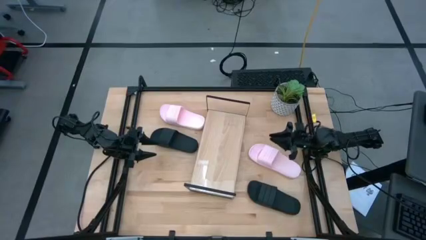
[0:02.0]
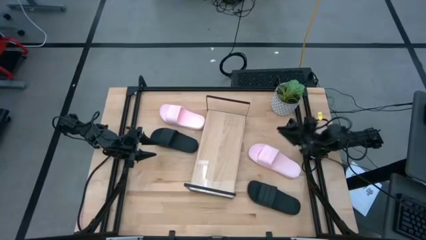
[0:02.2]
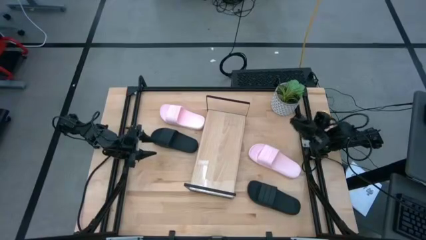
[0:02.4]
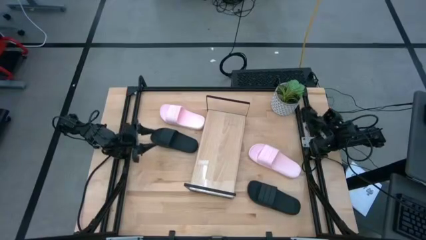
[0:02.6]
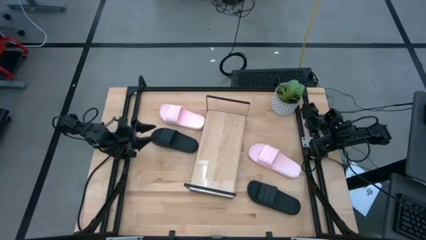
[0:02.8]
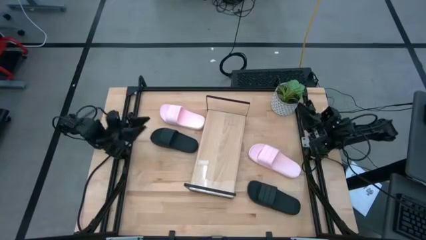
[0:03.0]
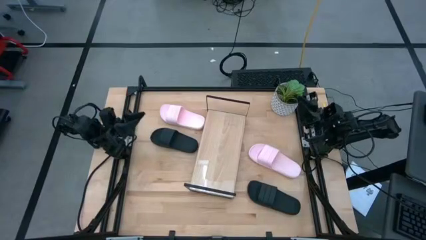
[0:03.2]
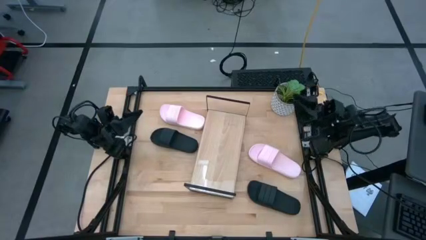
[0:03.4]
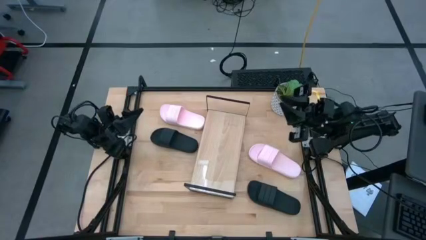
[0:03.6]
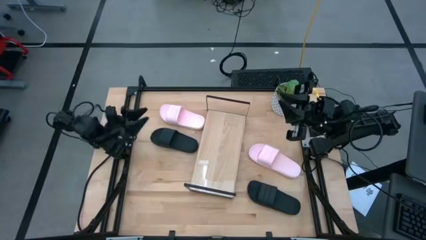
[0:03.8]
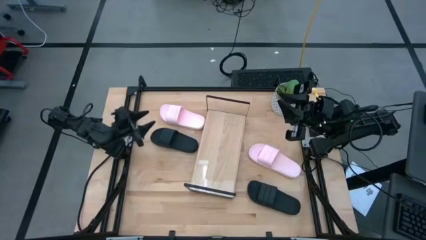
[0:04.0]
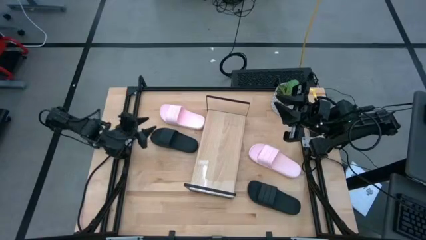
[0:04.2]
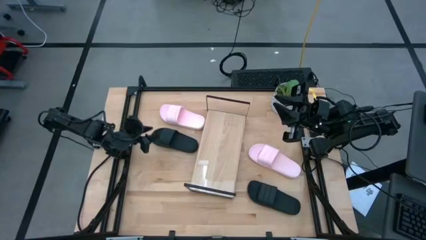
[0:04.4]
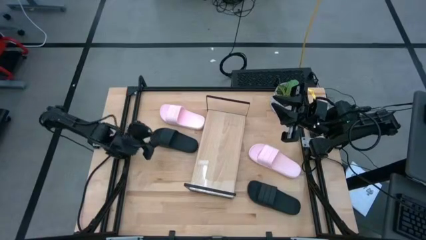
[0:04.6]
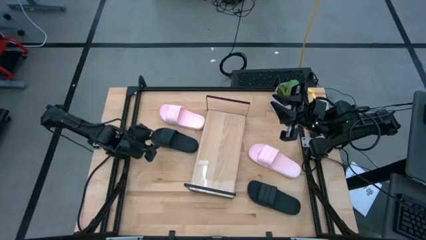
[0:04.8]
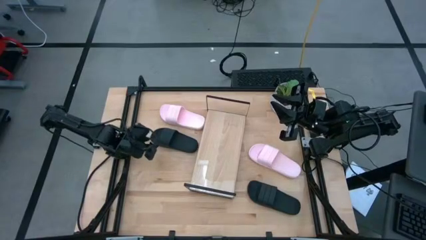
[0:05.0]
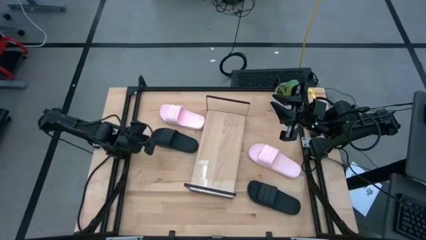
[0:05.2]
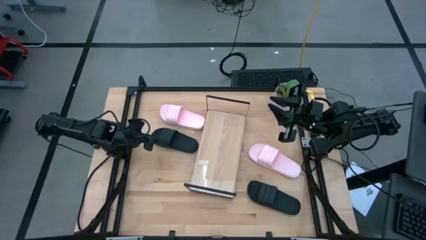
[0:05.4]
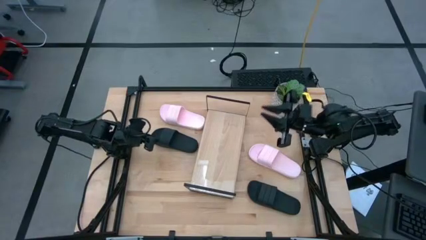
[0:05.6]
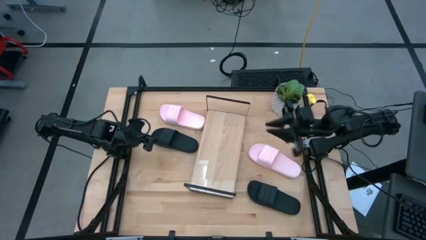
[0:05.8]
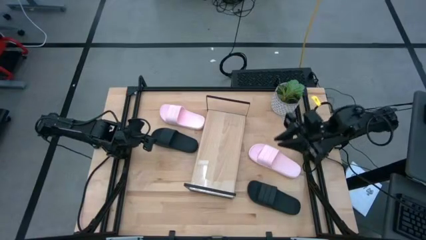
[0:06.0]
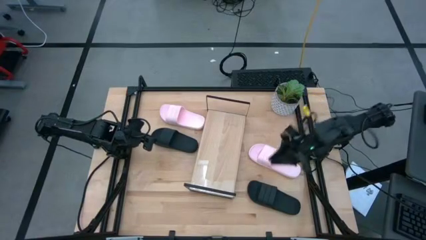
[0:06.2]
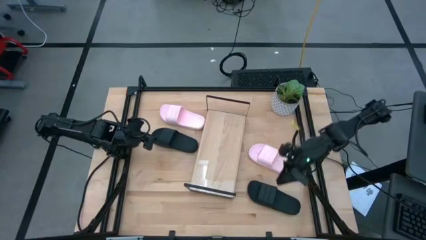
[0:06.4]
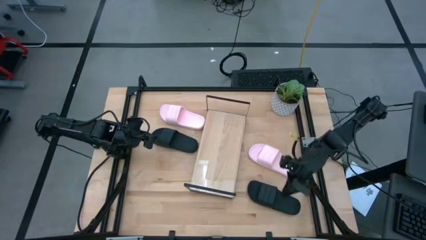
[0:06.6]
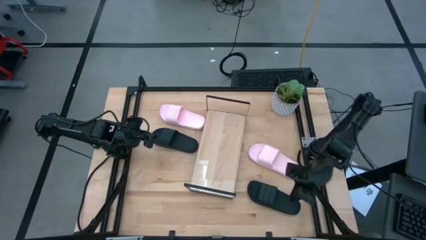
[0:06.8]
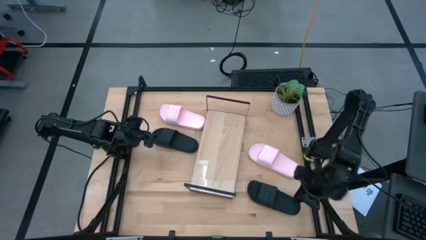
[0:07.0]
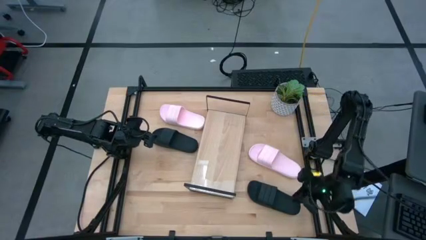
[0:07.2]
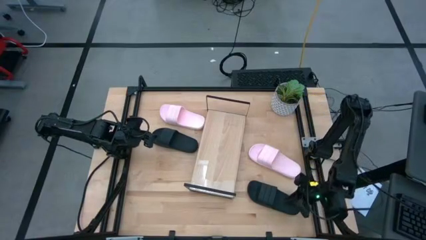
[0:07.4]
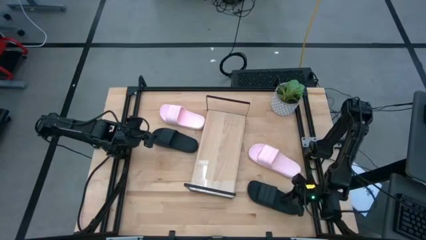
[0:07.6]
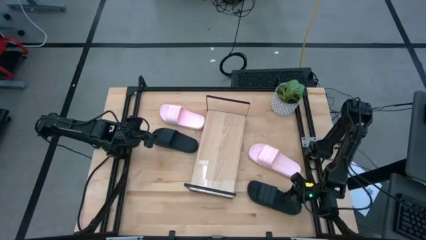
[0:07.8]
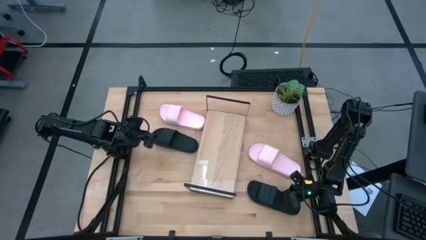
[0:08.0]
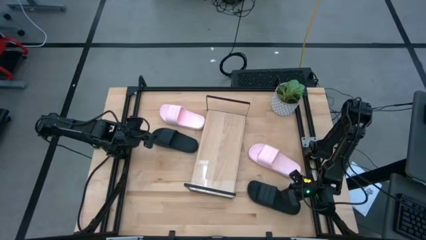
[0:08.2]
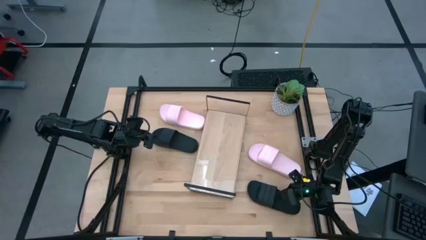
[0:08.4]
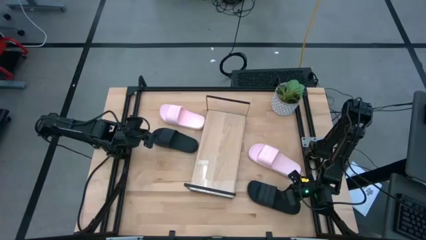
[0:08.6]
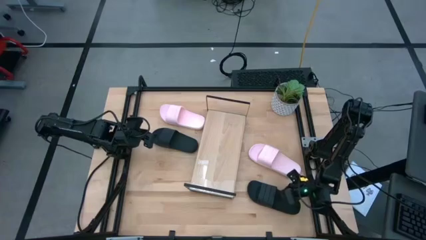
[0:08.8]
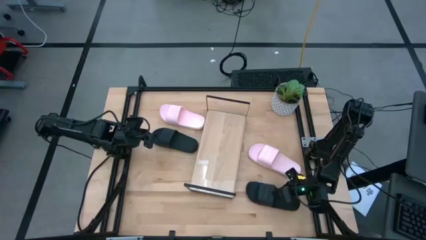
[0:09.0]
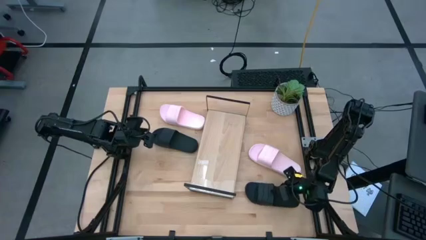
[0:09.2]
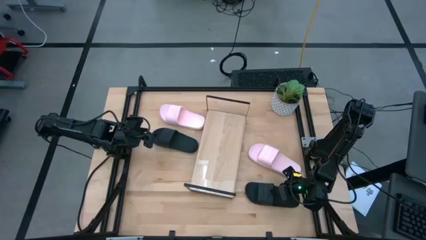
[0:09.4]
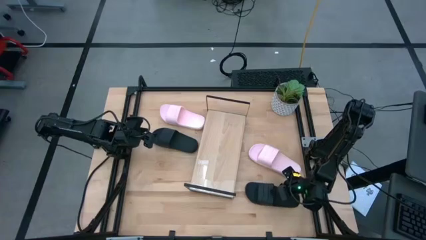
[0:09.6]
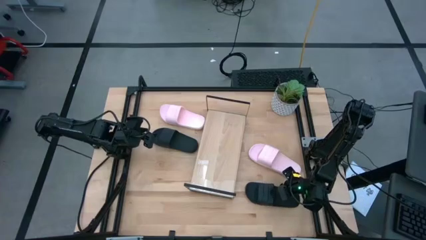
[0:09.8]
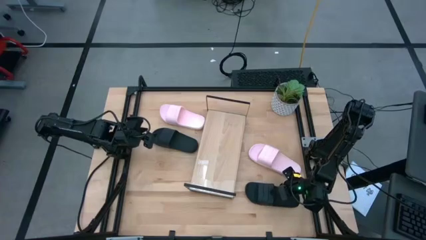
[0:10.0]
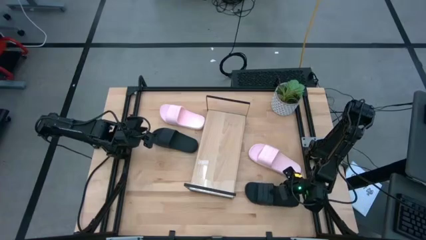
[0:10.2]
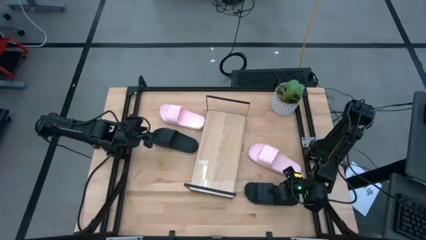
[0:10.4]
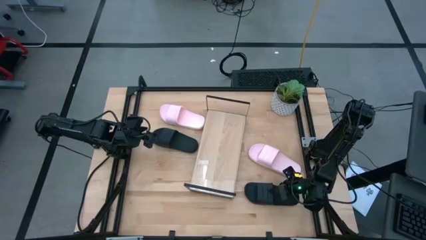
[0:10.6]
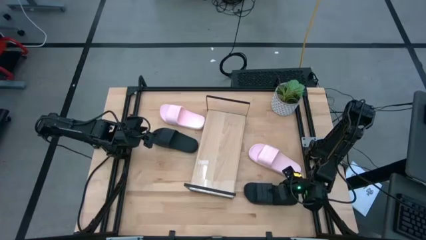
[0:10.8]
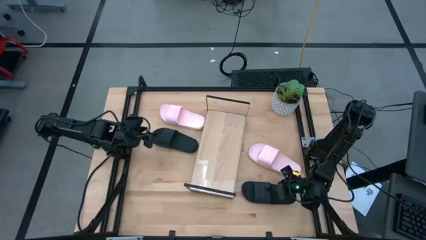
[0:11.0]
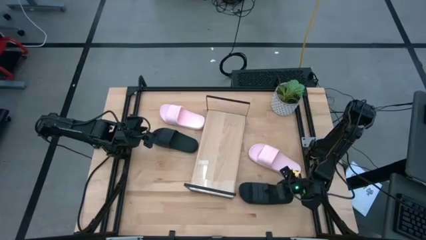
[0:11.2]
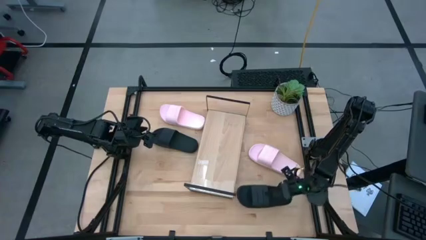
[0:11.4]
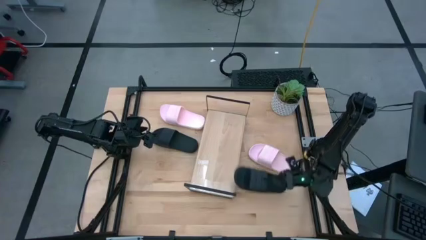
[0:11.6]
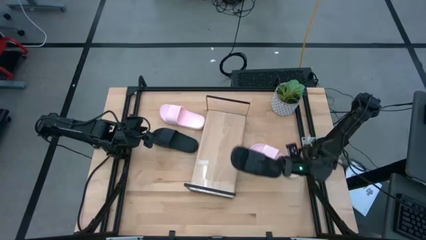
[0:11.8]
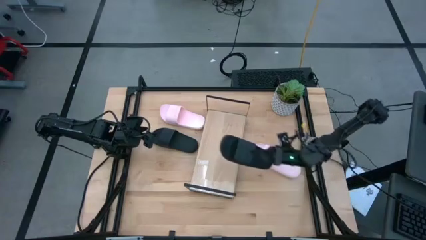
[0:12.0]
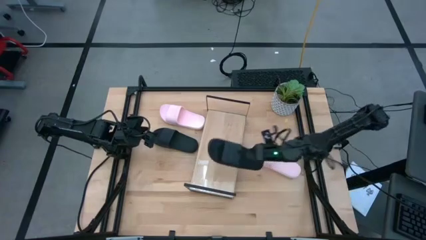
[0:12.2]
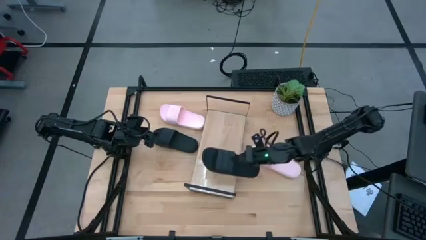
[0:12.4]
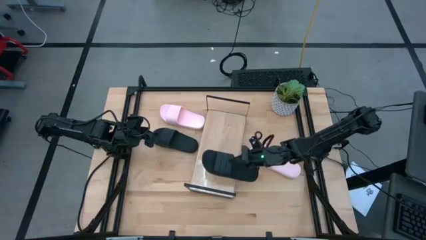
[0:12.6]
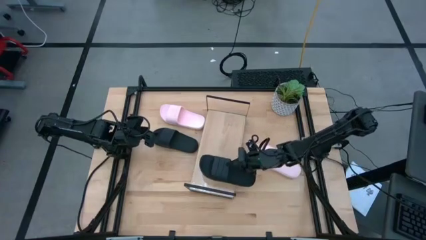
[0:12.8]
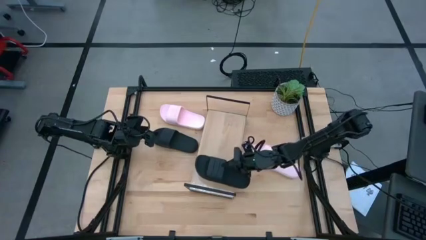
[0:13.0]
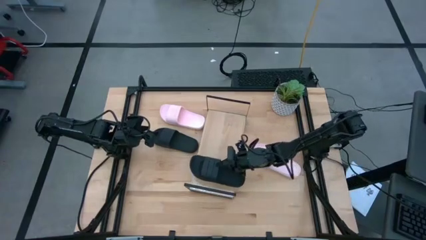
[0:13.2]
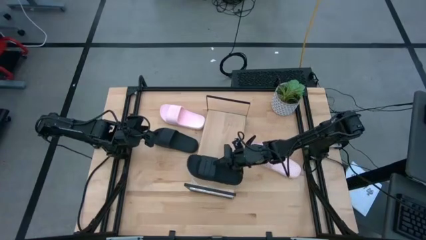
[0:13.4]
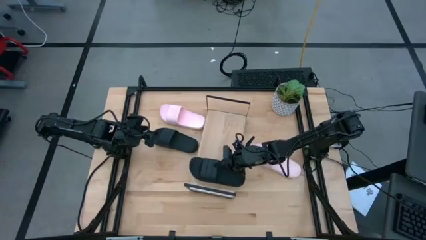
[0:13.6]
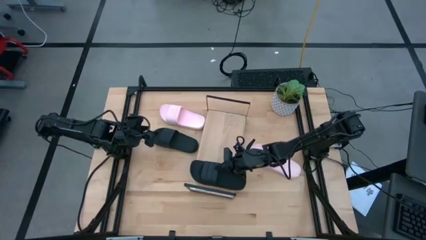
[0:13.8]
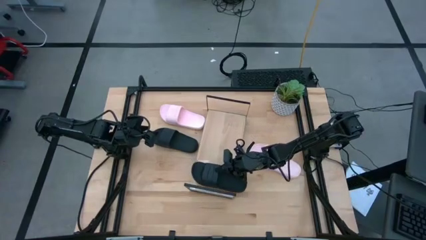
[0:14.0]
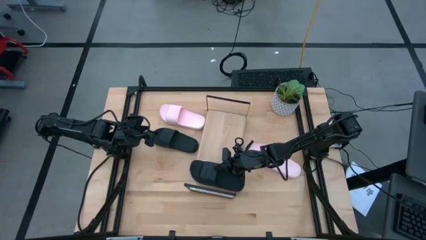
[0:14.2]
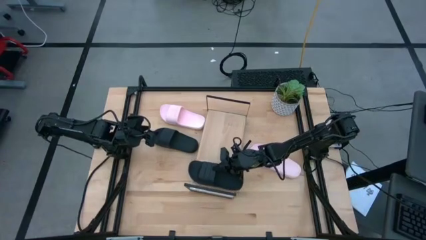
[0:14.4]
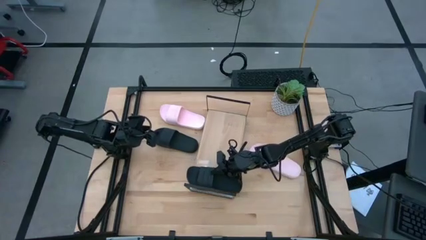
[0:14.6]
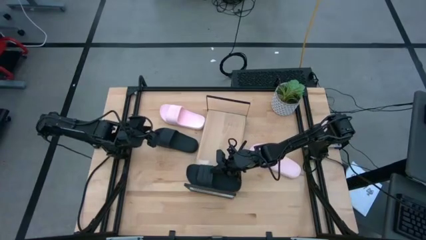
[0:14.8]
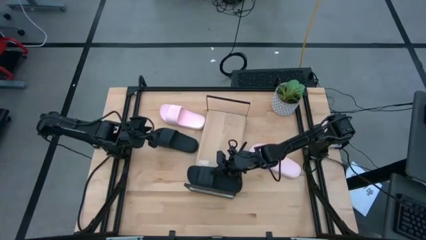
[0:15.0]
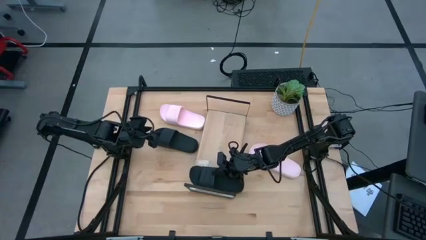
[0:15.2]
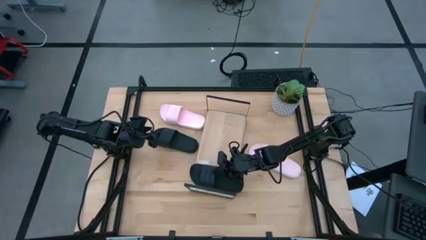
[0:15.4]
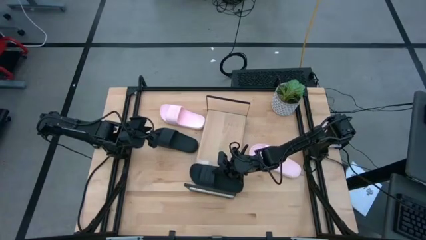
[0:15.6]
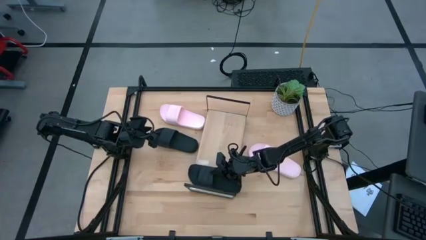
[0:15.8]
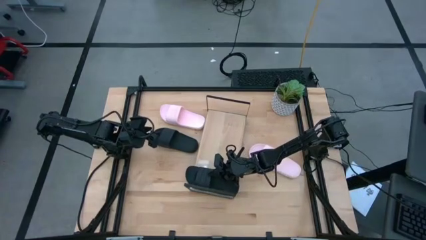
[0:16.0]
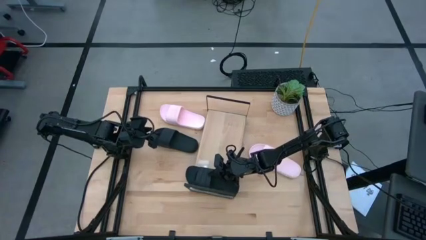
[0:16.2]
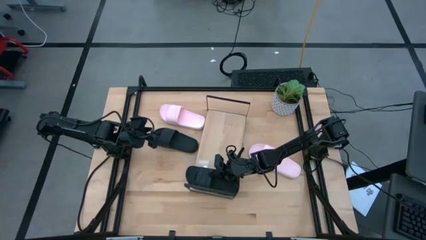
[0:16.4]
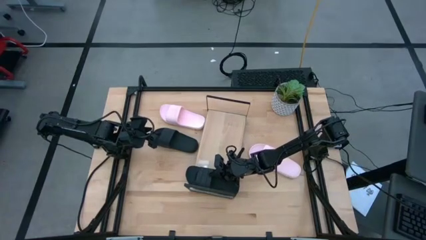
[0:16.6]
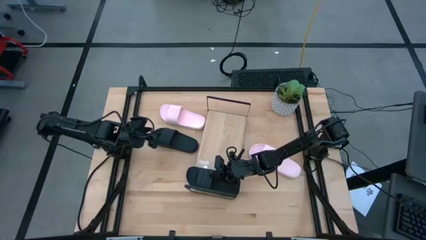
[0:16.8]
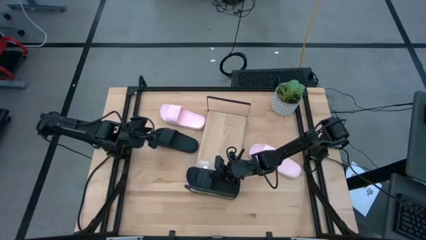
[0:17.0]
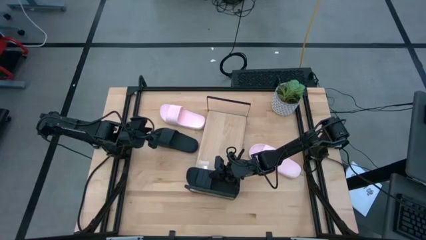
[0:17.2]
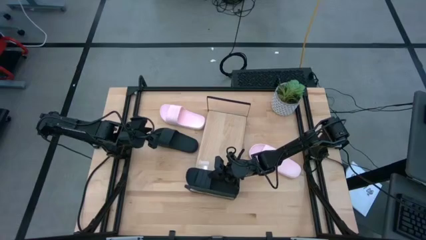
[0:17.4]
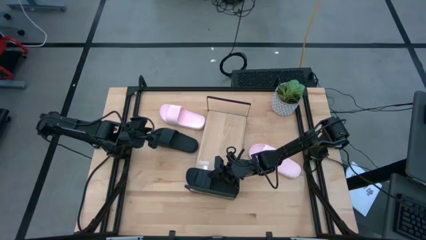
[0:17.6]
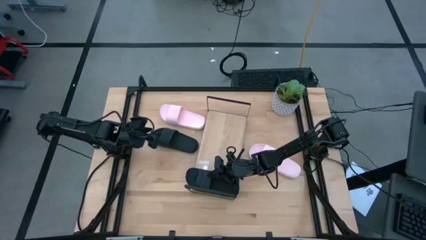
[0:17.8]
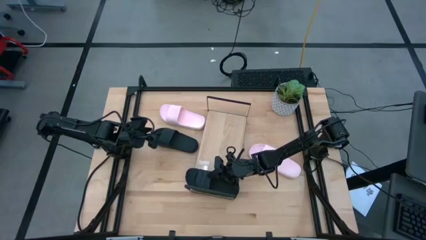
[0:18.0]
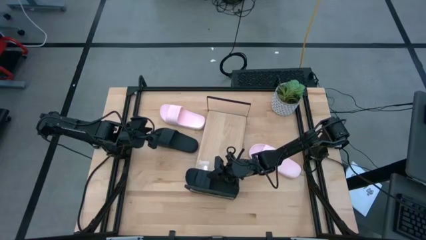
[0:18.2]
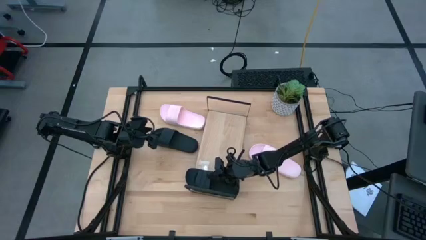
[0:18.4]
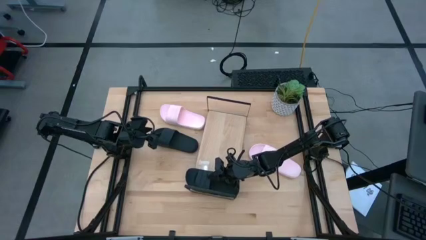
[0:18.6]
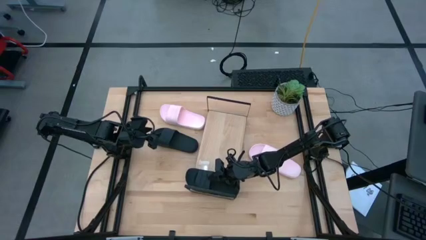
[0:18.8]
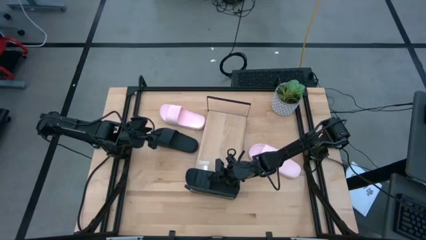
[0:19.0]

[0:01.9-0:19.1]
Task: Pick and place slides into the shelf
Put the right black slide on the shelf
